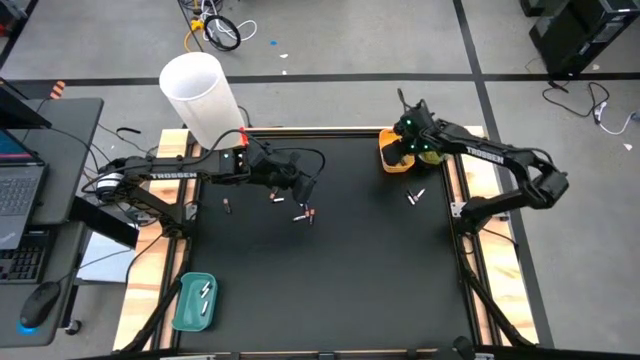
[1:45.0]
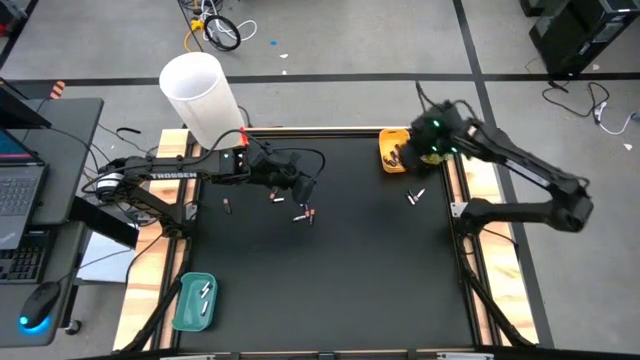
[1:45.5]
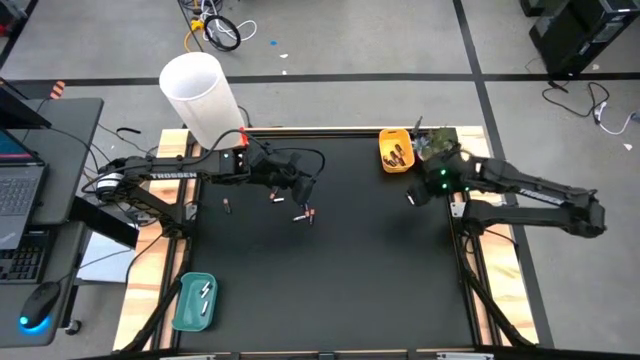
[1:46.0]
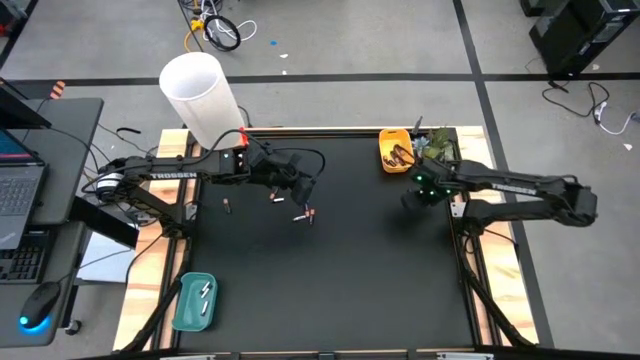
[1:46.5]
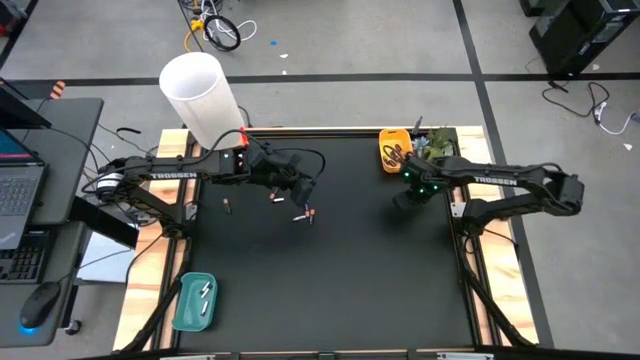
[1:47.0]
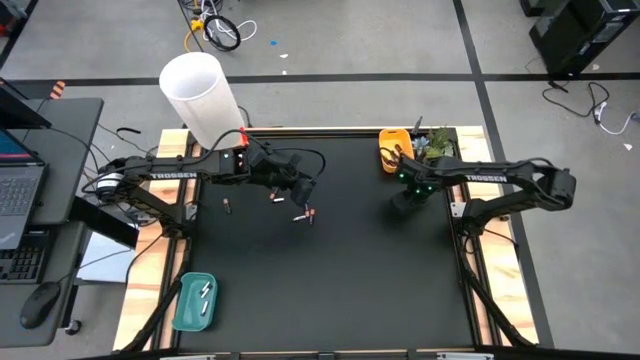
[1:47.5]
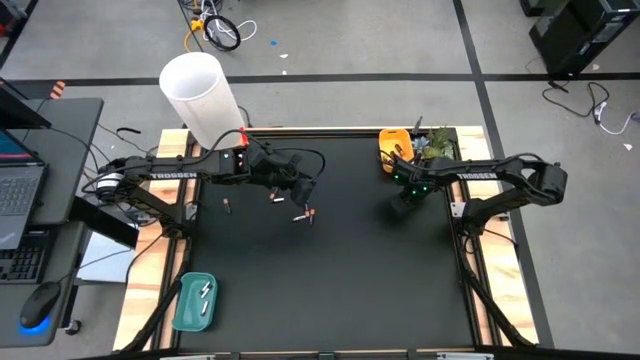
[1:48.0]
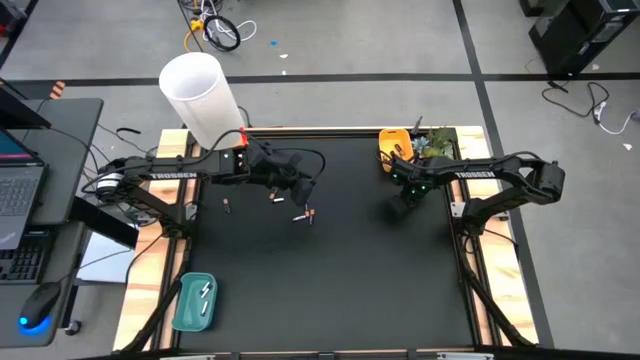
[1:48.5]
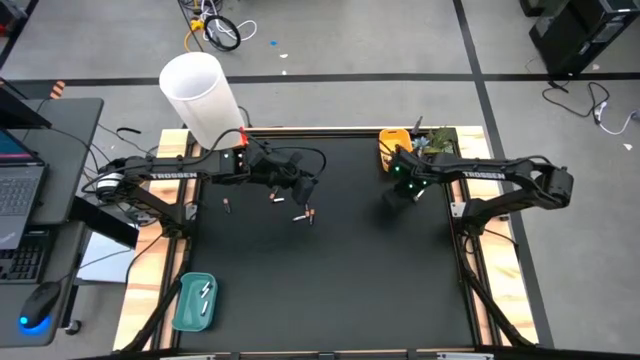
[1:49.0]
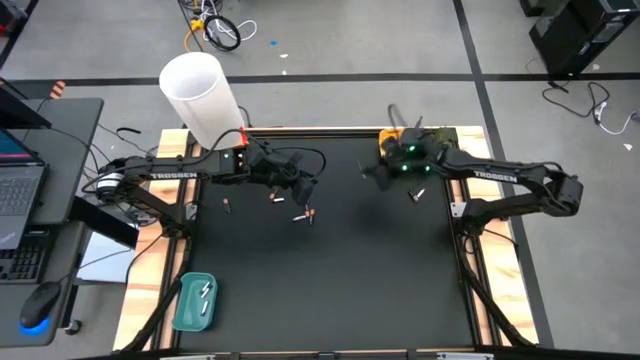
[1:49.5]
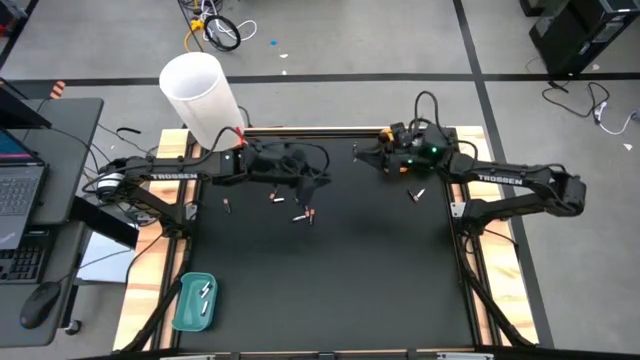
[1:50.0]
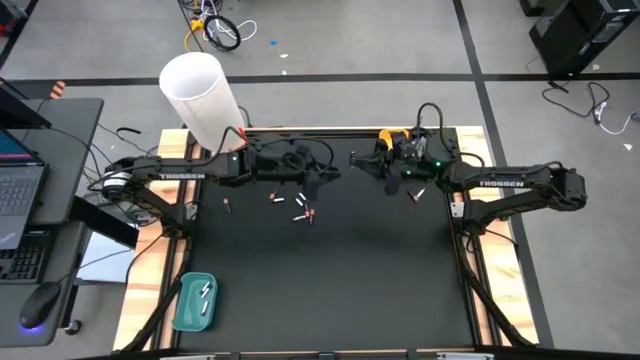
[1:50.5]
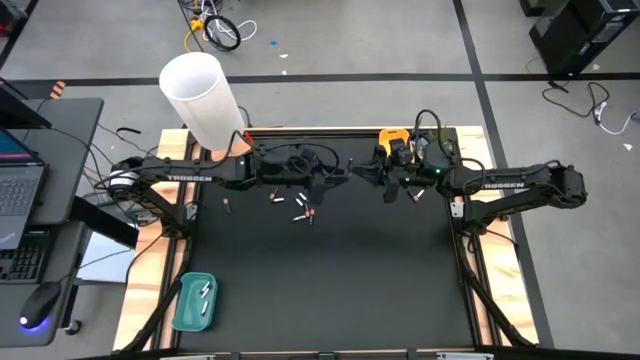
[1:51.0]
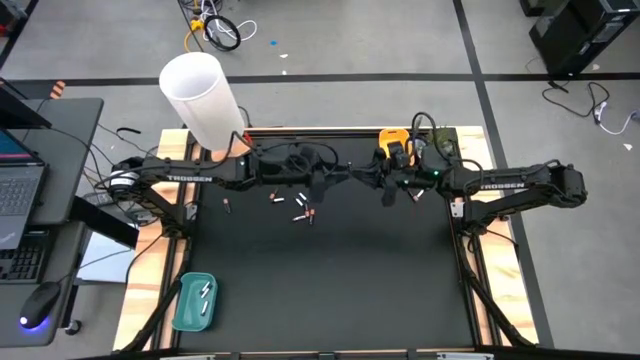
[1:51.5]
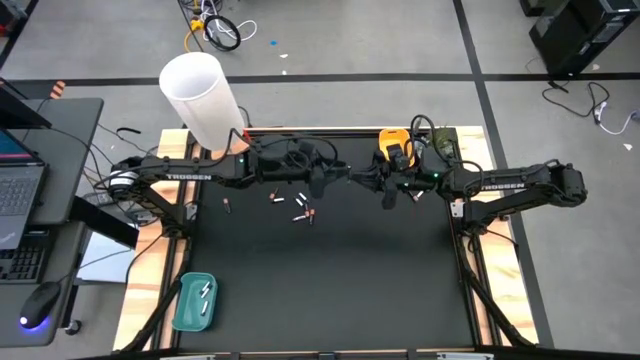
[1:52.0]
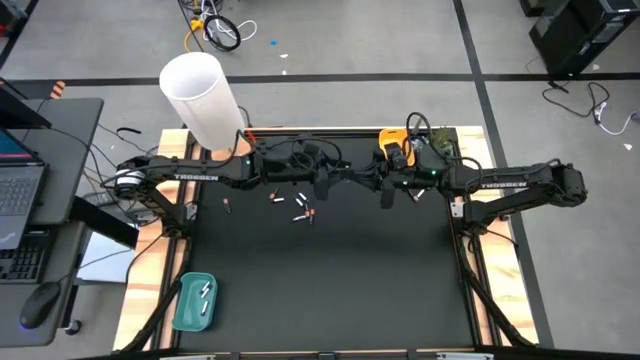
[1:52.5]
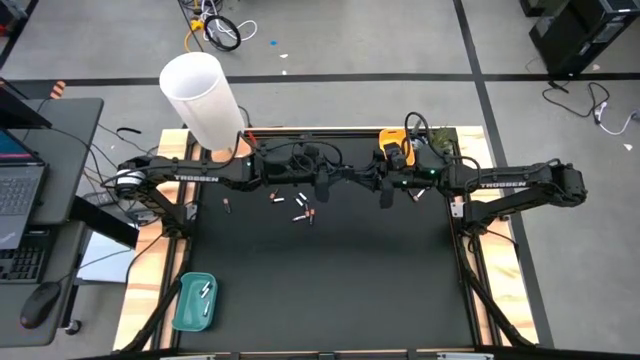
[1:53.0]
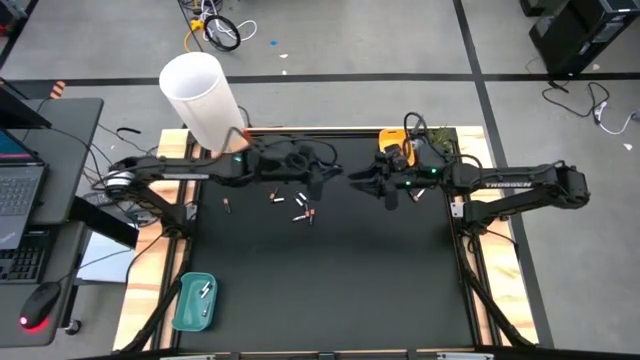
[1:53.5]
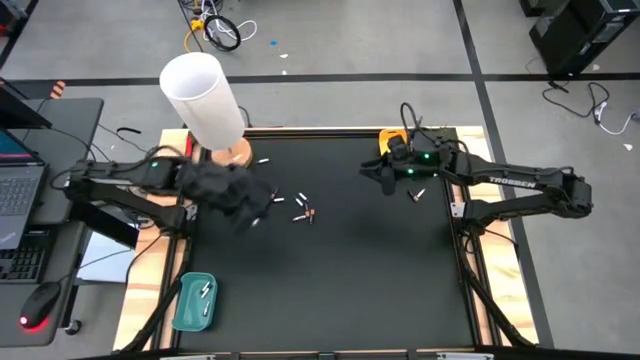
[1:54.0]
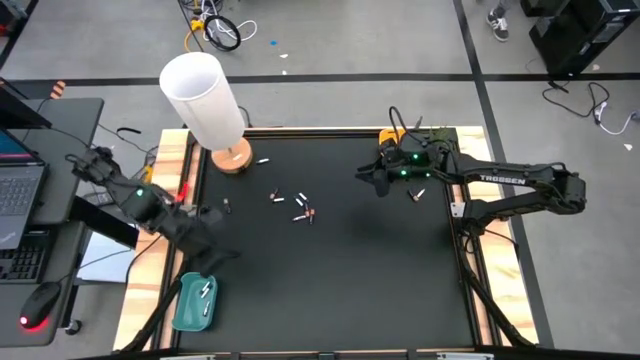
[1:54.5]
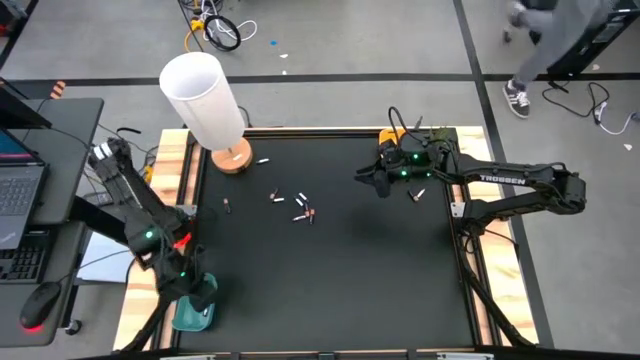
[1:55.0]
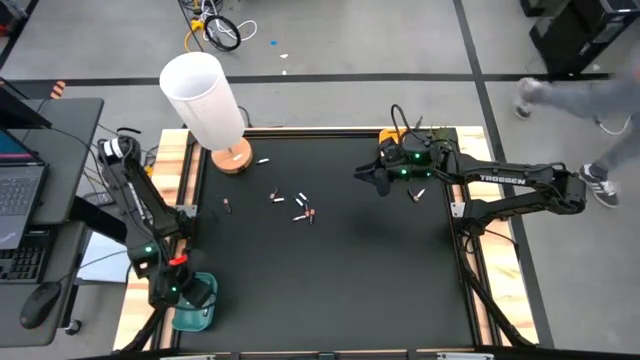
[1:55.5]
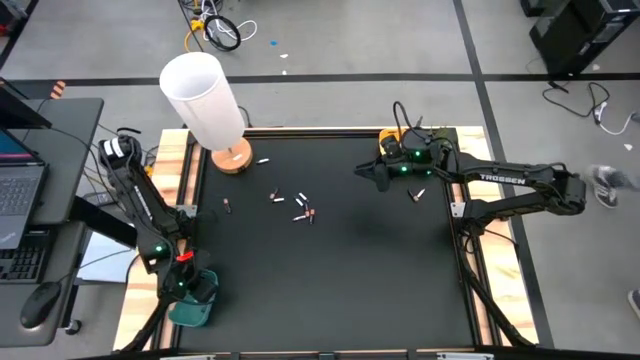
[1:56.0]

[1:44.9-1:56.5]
Task: Sort batteries
Put the silver battery into the blue bin

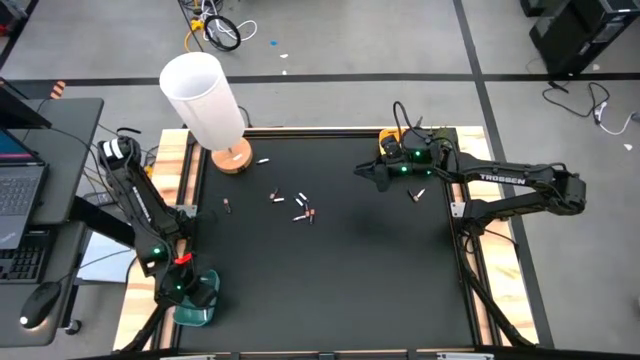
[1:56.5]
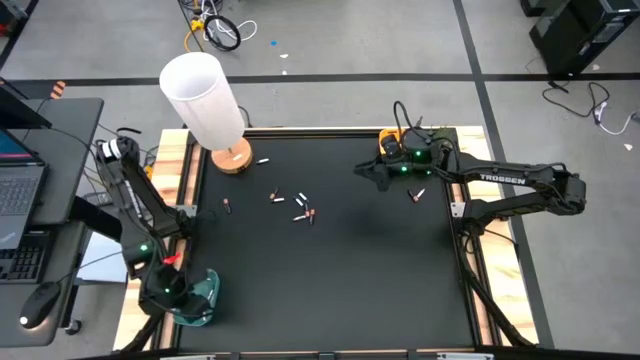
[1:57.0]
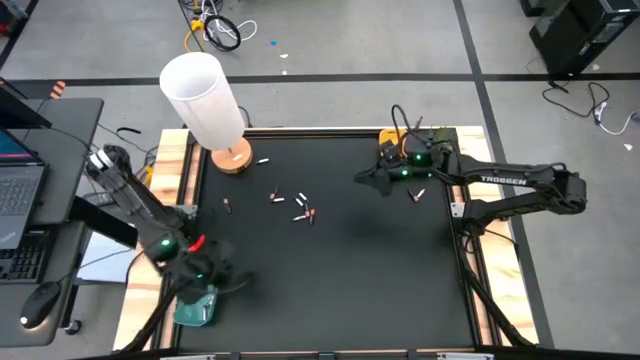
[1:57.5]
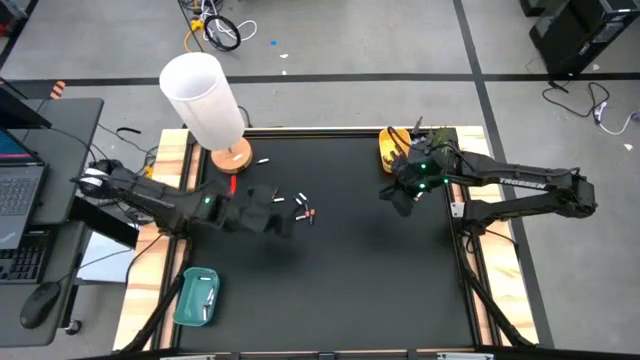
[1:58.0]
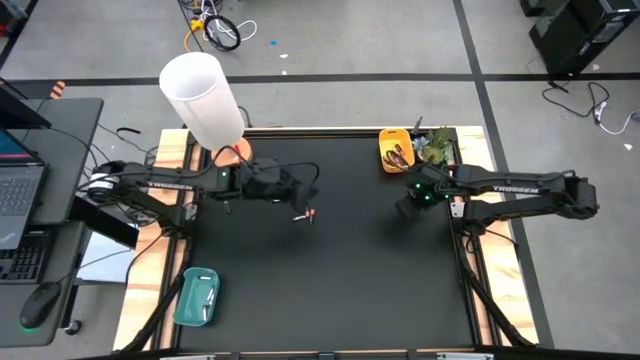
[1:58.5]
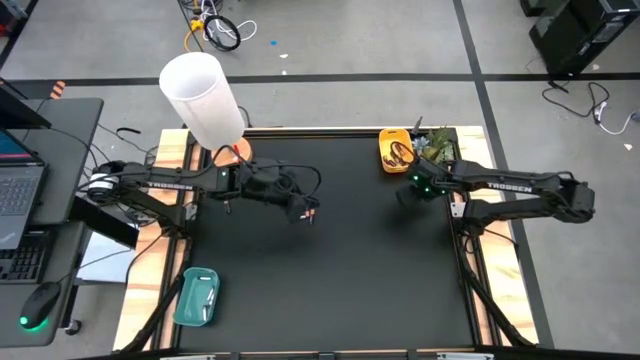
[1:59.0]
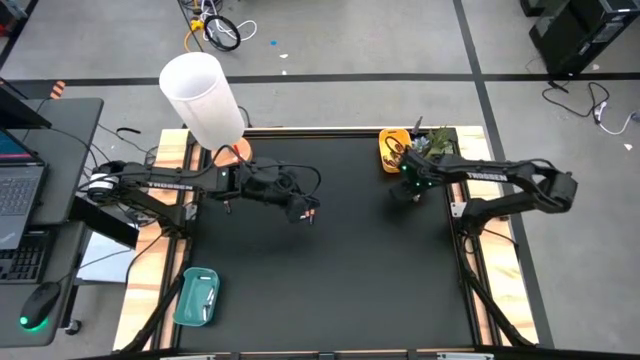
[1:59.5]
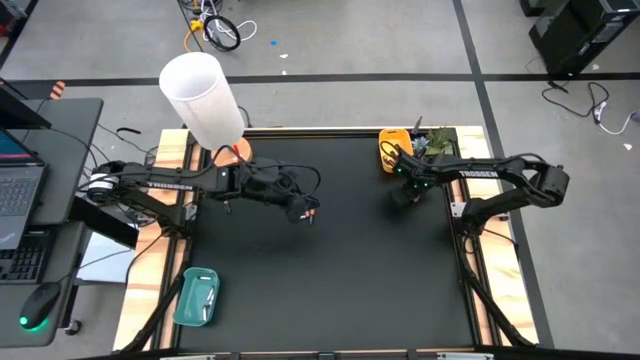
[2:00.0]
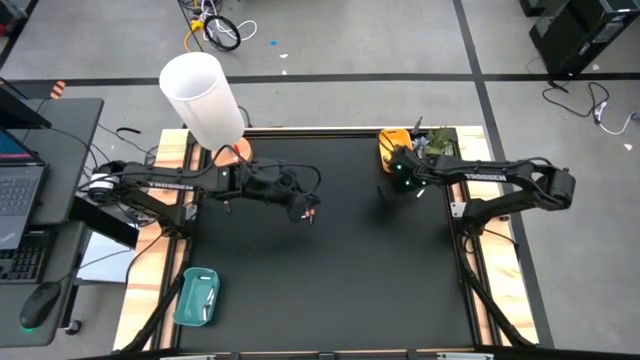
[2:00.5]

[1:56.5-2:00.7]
Put the black battery into the yellow bin

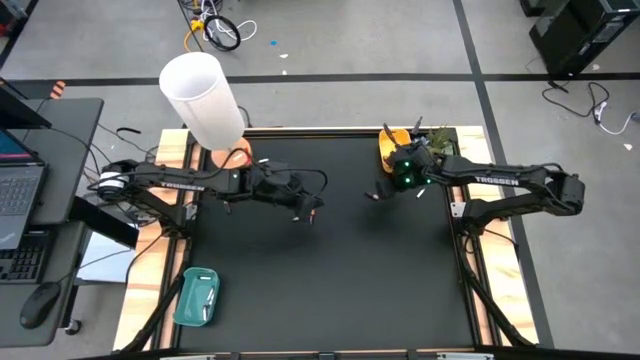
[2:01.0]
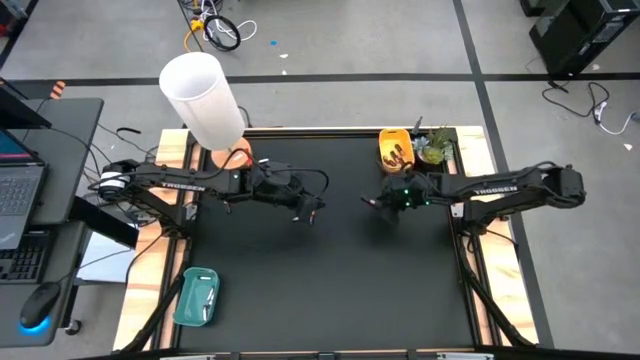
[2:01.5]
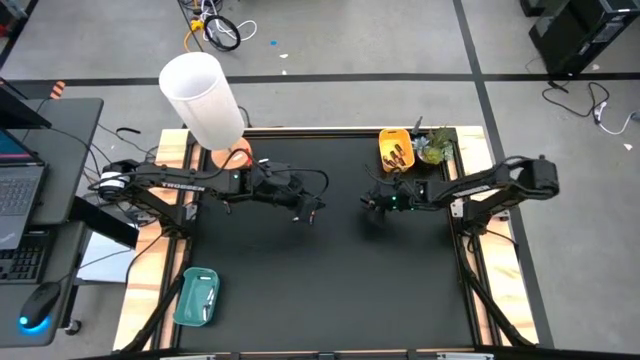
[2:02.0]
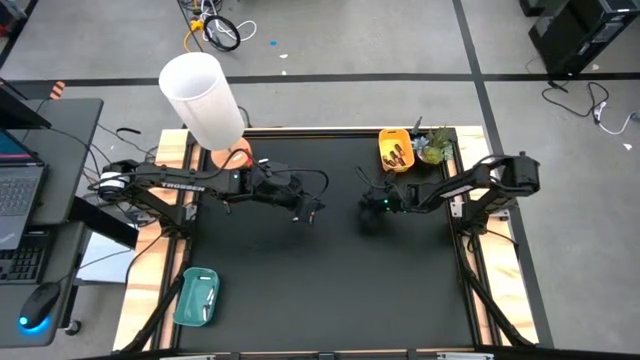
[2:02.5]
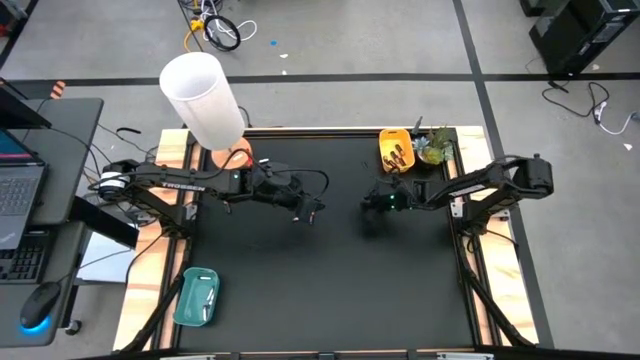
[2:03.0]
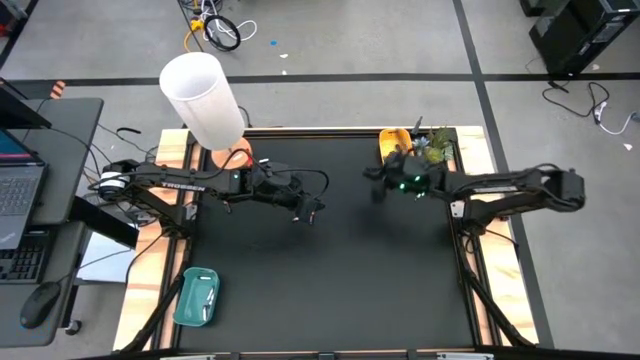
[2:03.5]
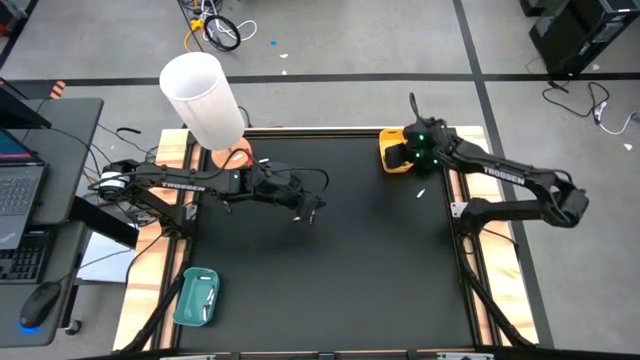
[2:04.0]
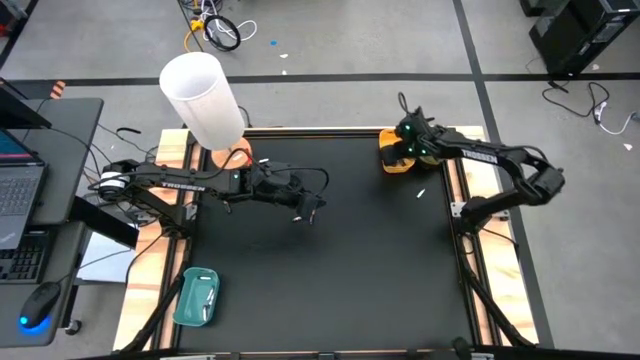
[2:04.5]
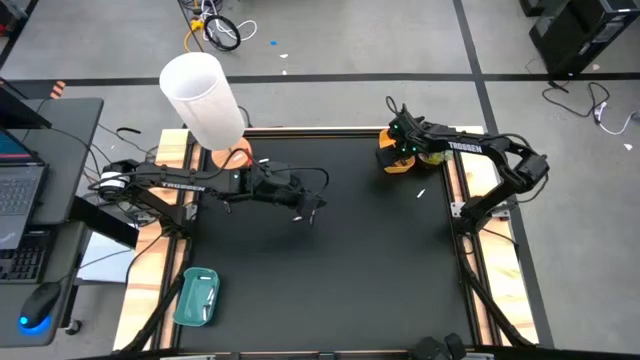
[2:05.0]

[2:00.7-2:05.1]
Put the black battery into the yellow bin
